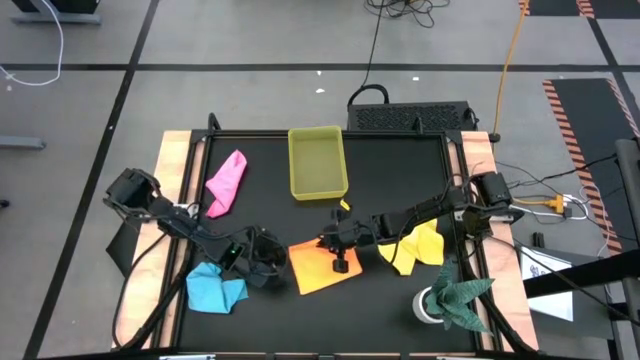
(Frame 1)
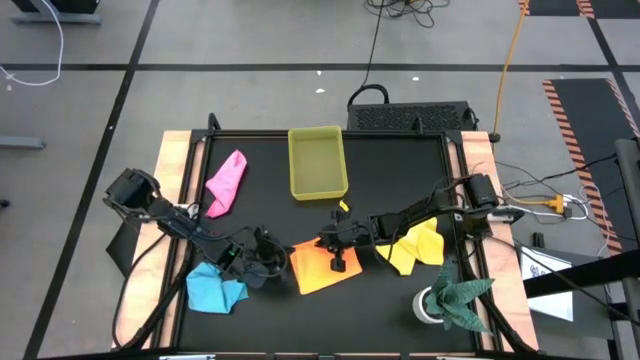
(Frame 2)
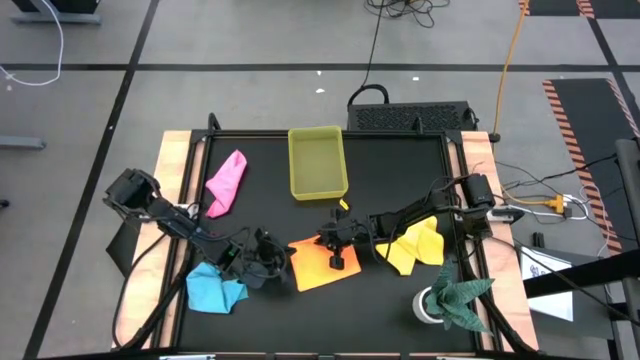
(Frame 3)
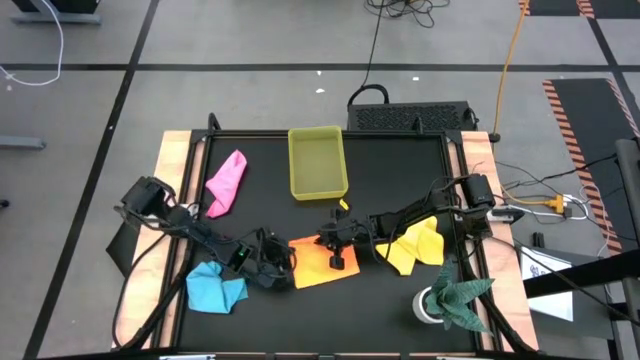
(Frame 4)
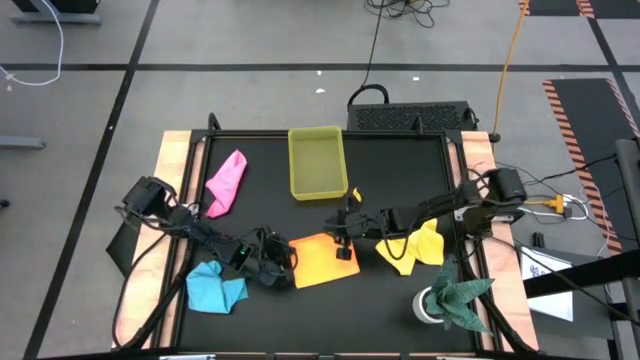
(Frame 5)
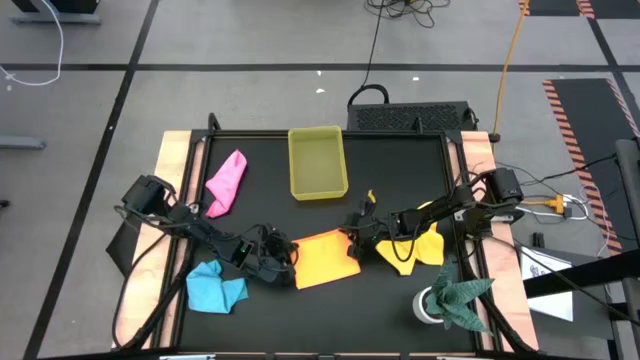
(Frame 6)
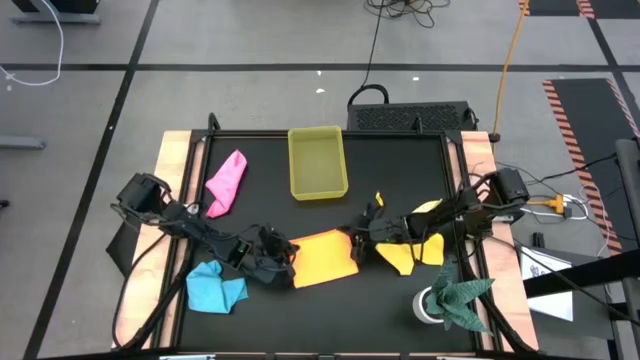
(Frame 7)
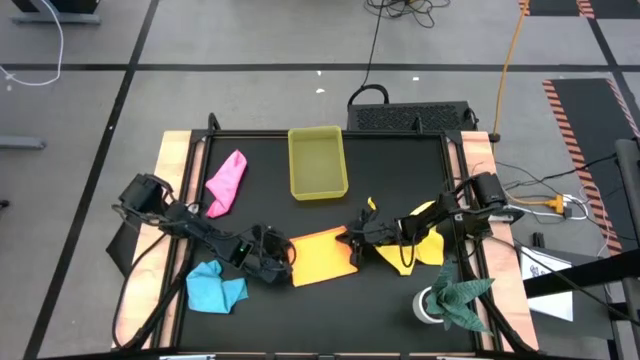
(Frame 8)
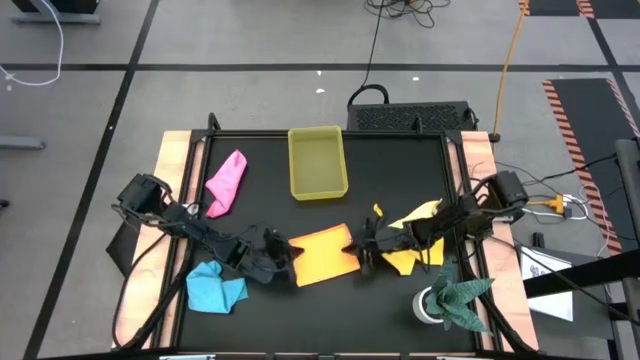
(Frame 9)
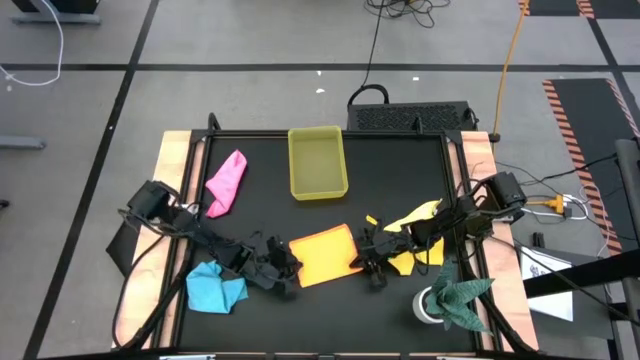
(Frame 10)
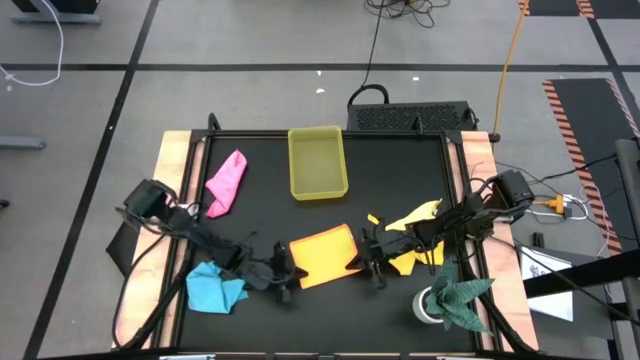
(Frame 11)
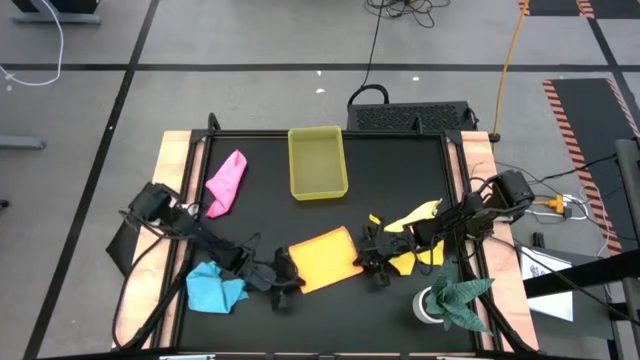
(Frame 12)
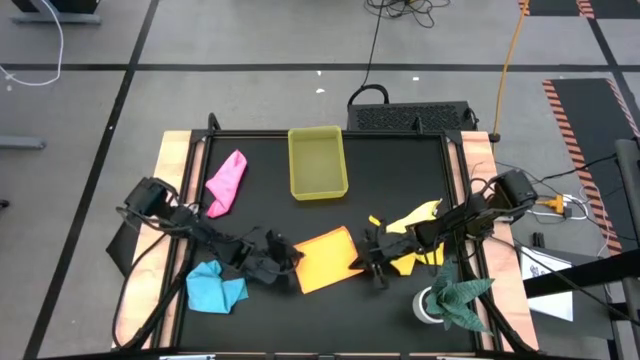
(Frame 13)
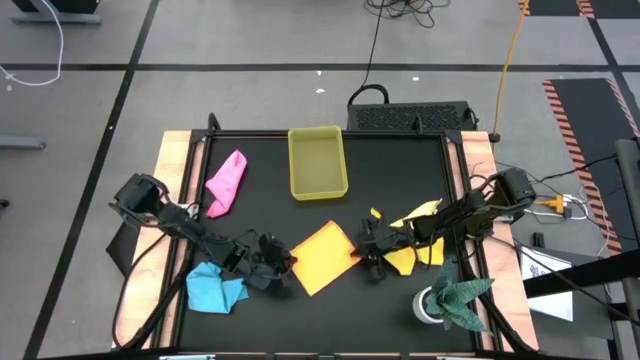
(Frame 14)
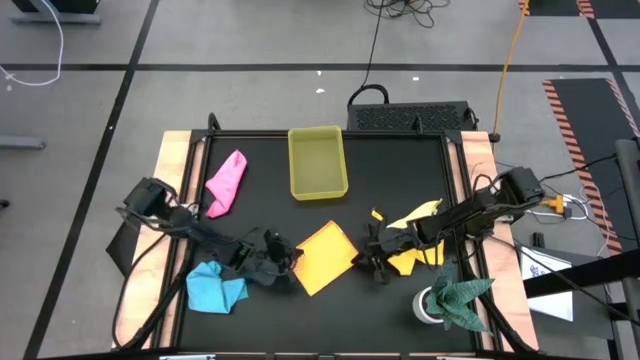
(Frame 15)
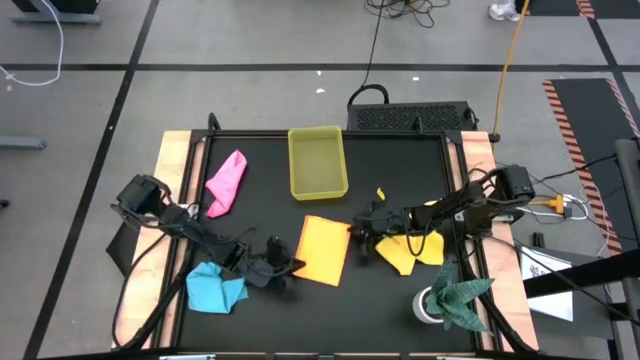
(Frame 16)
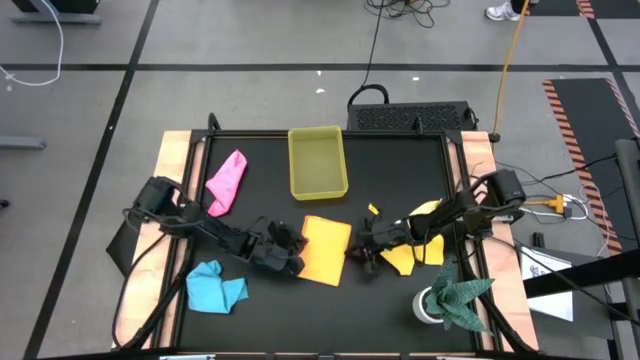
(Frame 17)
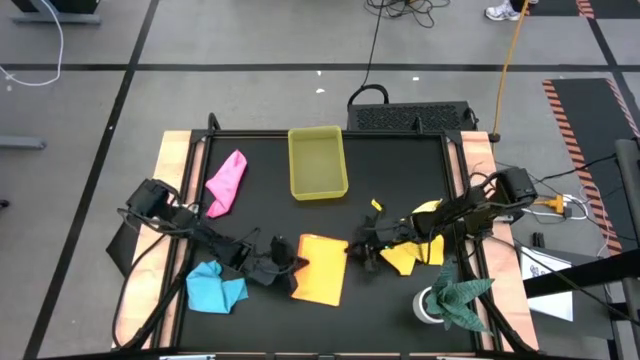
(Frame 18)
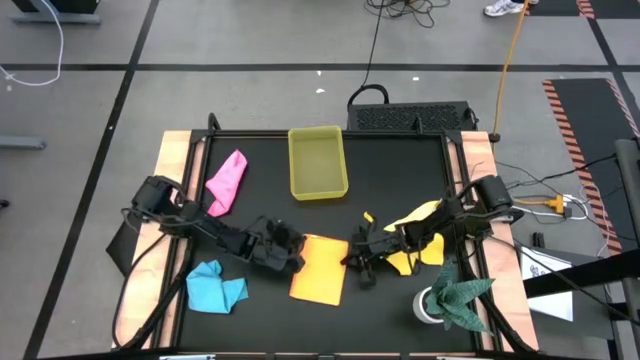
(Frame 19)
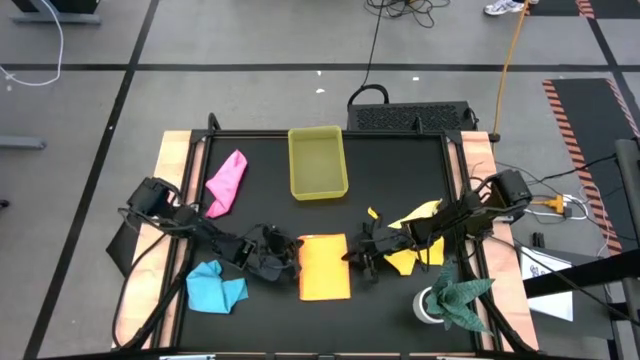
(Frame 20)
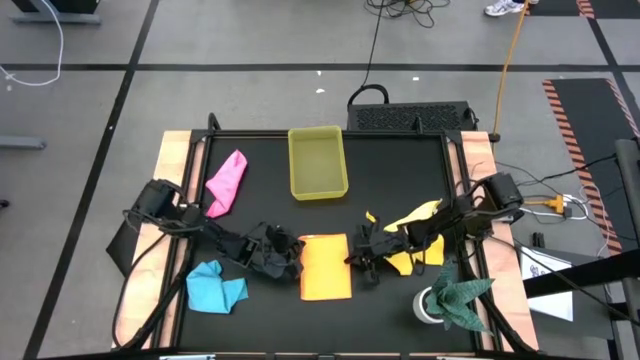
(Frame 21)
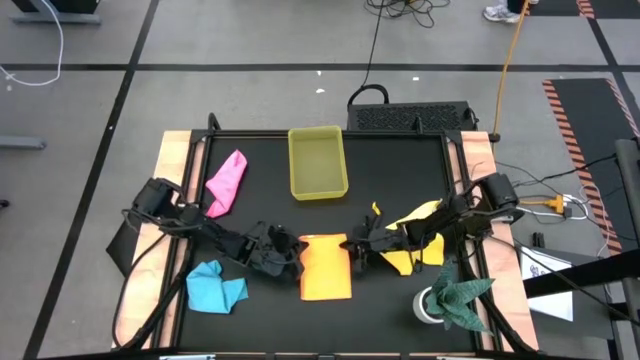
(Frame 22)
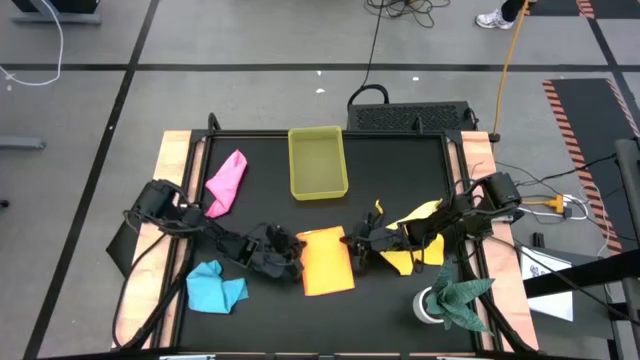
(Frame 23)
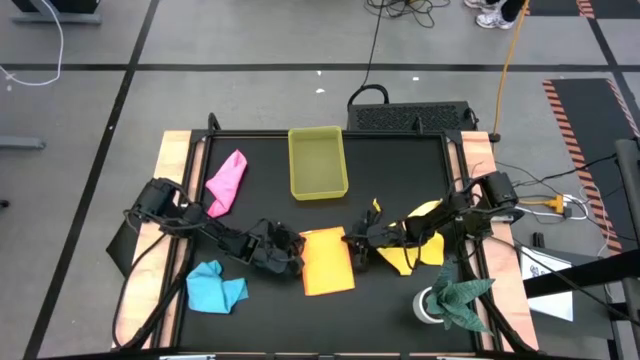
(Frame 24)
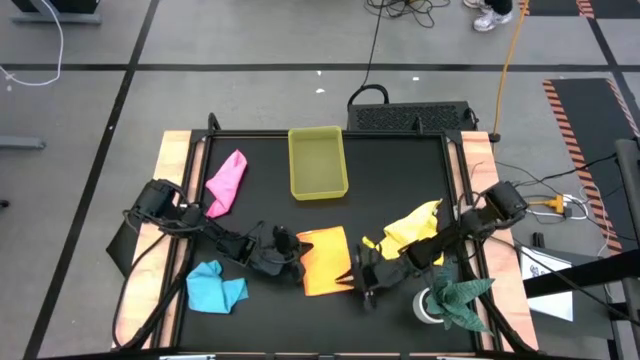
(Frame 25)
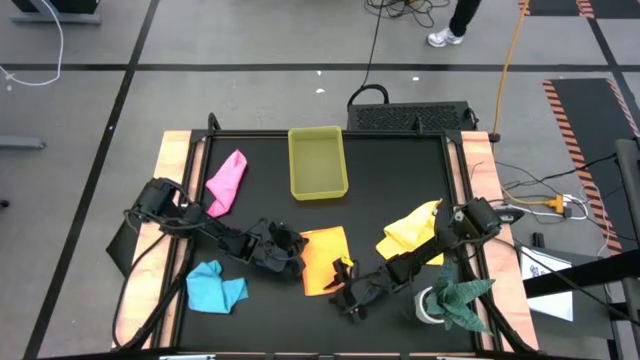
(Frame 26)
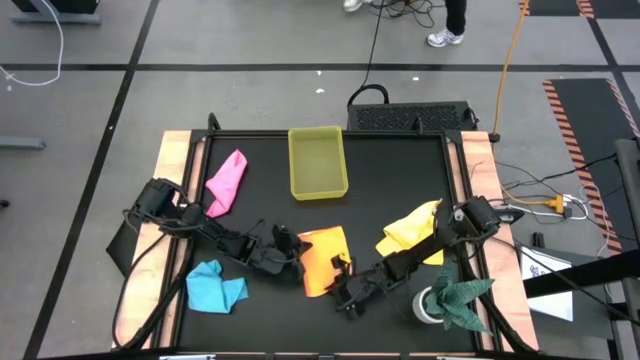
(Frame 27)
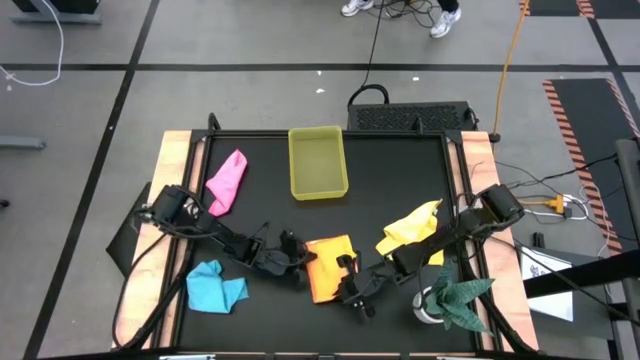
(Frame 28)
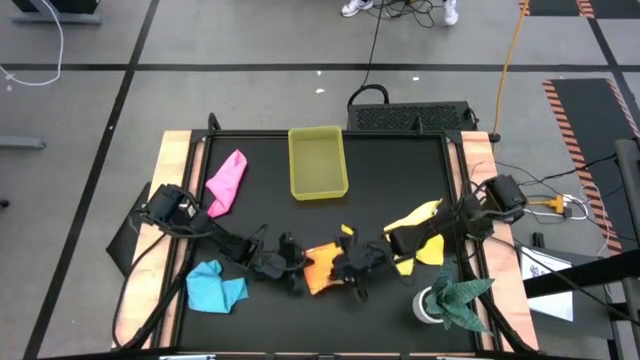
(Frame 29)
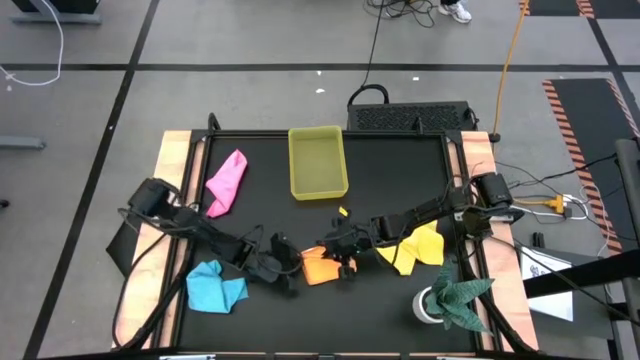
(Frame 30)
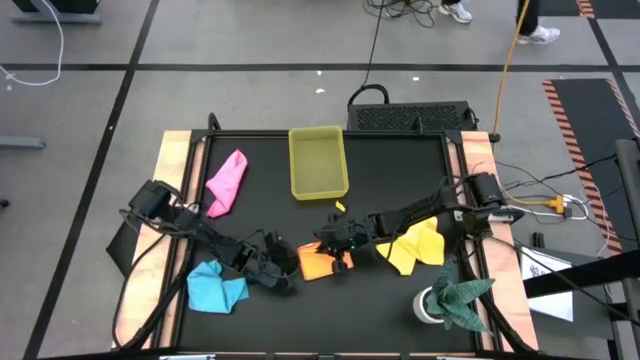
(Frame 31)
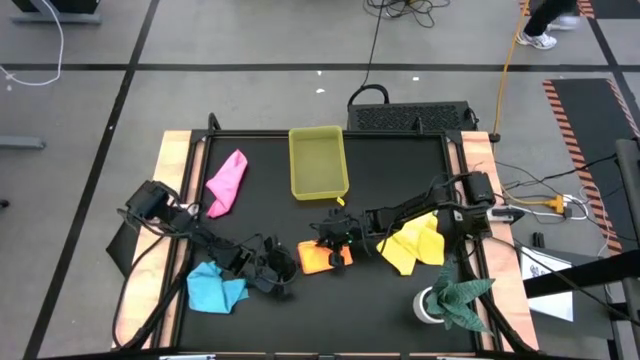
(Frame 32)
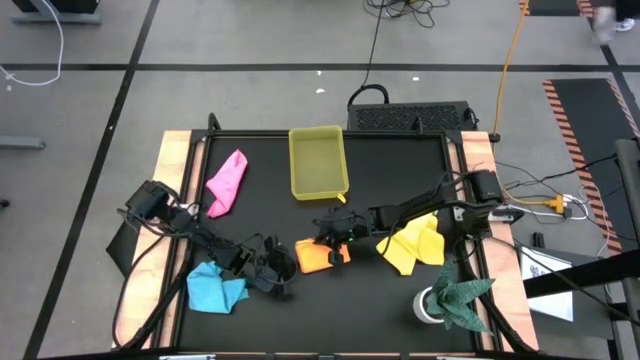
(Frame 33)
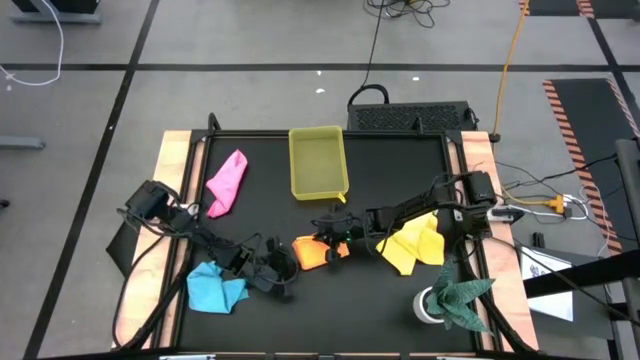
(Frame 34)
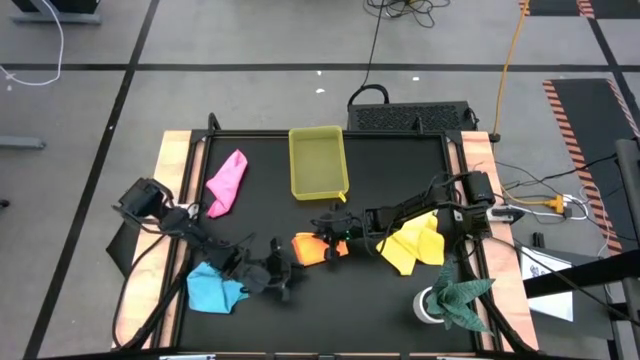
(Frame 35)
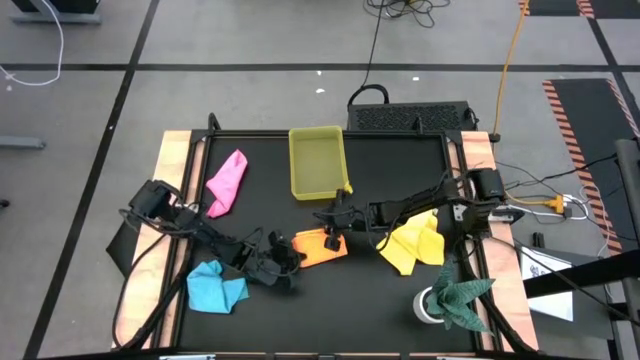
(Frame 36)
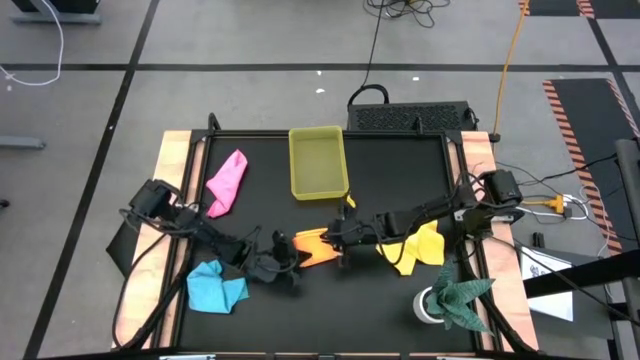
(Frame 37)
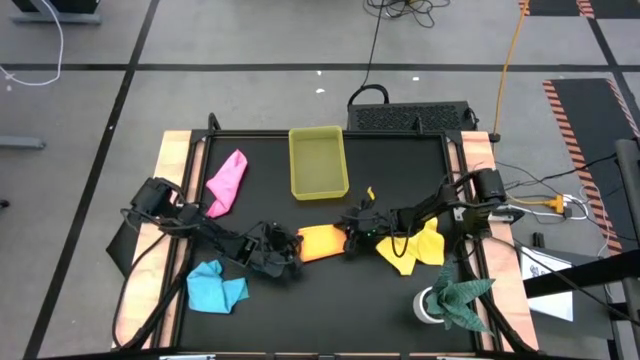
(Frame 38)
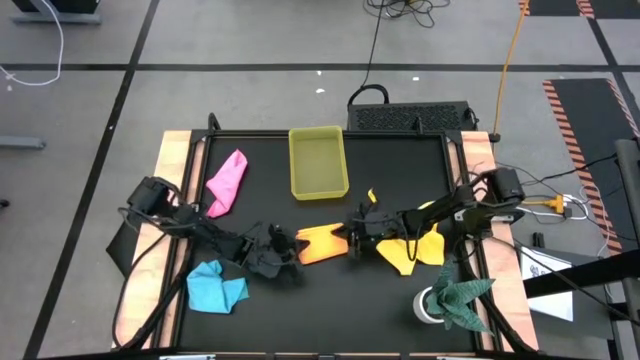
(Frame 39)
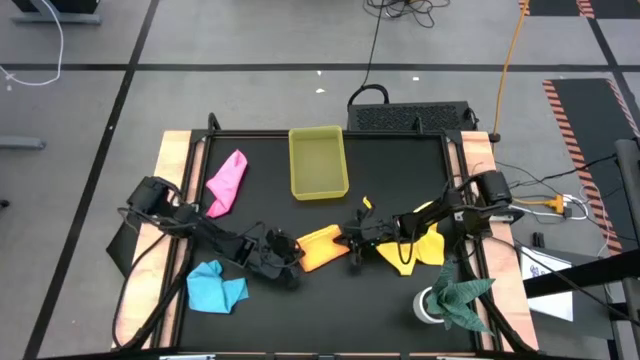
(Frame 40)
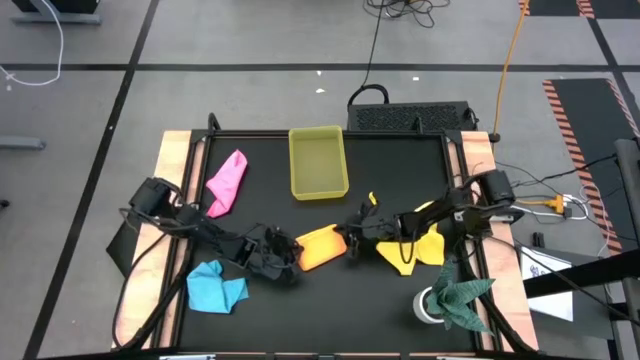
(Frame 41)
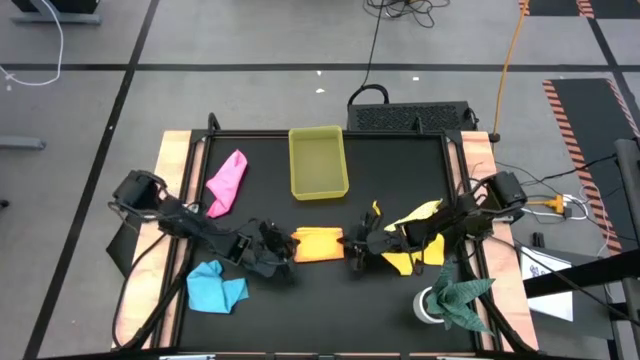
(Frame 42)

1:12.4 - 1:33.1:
Task: Fold microfiber towels
Fold the orange towel
